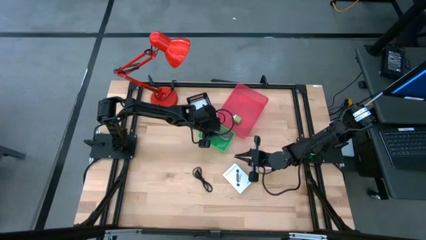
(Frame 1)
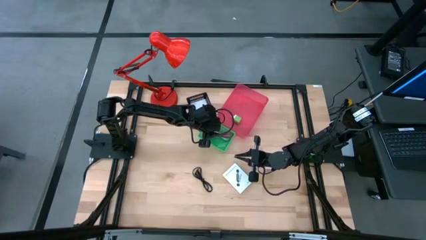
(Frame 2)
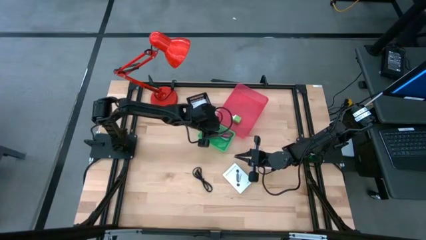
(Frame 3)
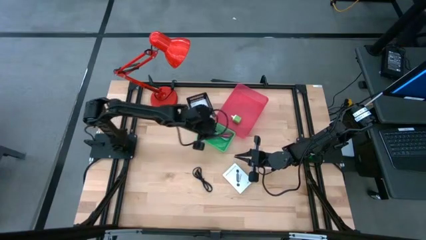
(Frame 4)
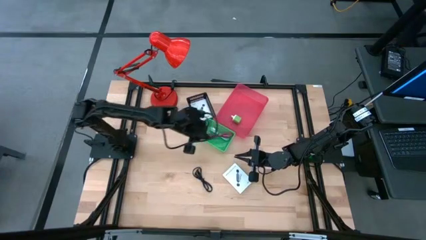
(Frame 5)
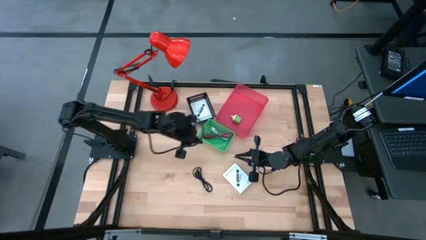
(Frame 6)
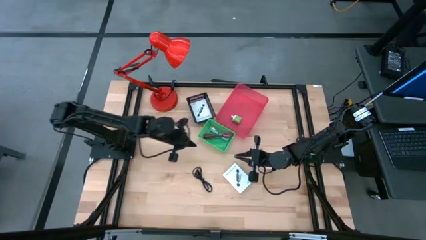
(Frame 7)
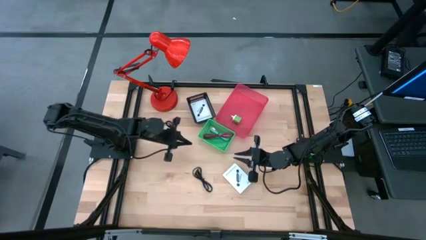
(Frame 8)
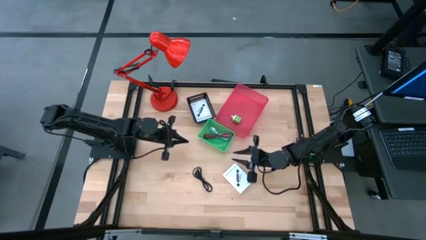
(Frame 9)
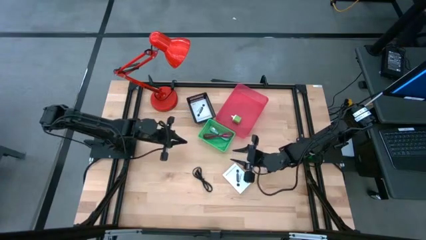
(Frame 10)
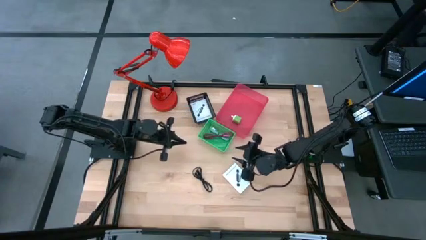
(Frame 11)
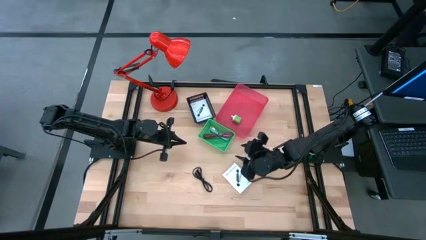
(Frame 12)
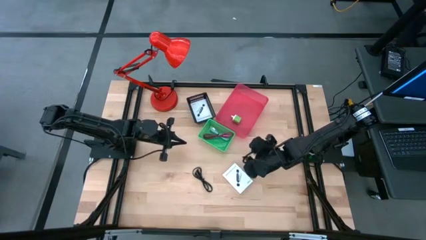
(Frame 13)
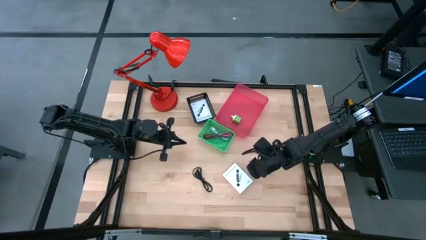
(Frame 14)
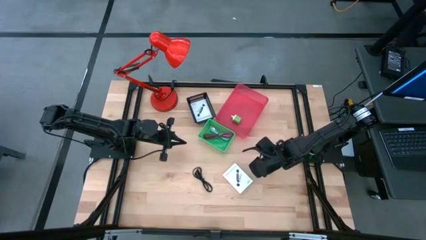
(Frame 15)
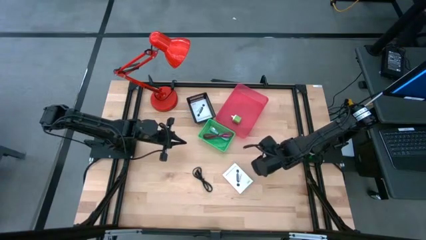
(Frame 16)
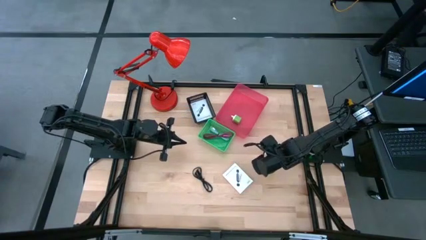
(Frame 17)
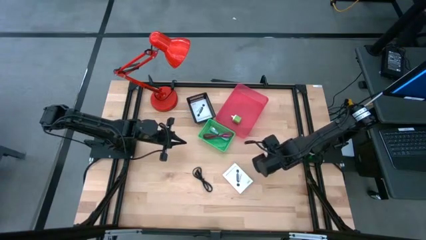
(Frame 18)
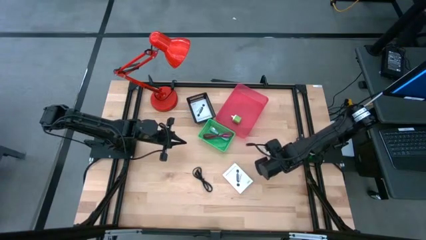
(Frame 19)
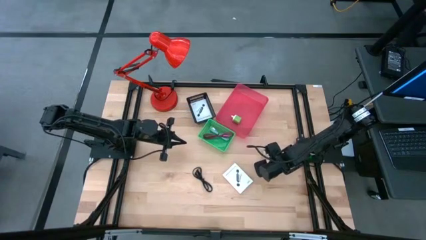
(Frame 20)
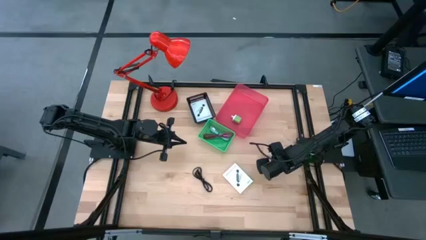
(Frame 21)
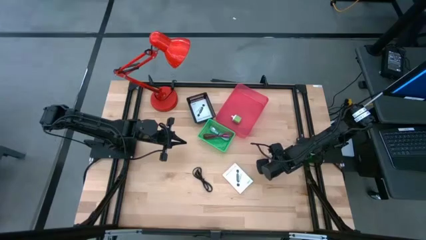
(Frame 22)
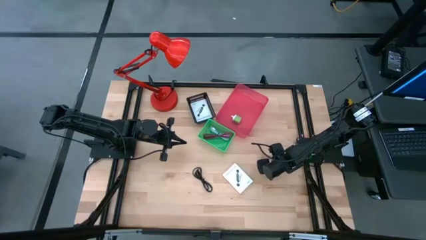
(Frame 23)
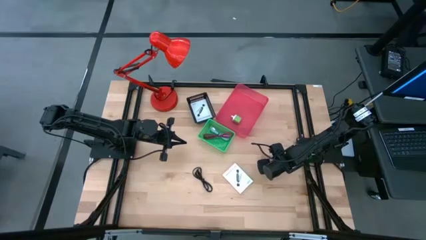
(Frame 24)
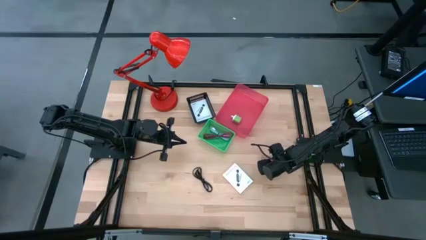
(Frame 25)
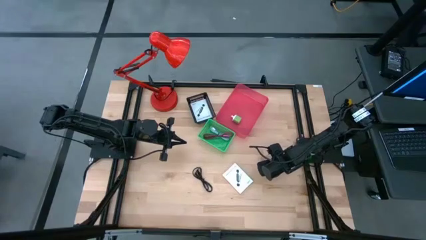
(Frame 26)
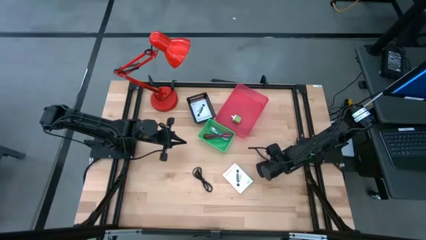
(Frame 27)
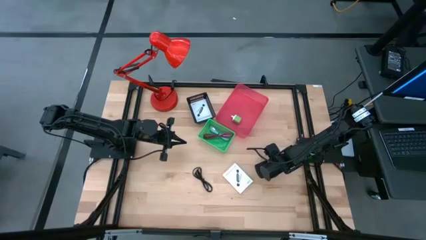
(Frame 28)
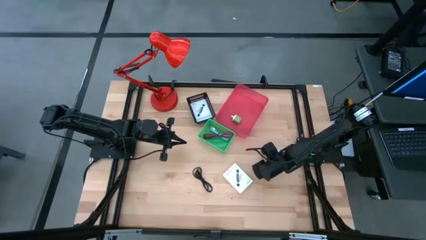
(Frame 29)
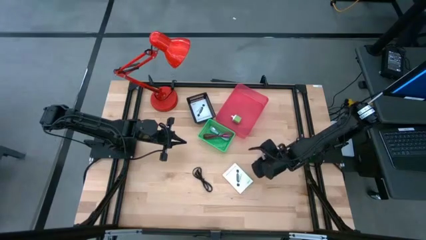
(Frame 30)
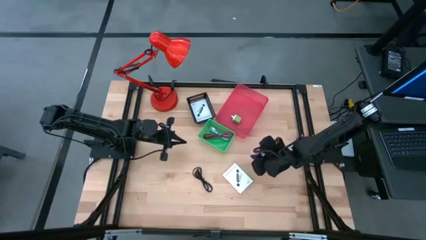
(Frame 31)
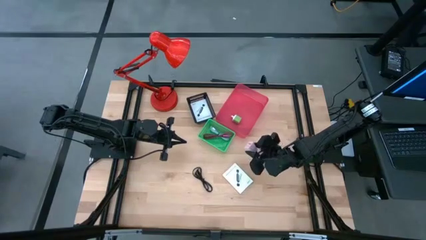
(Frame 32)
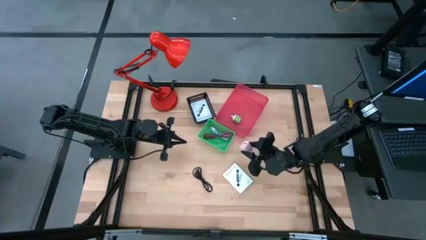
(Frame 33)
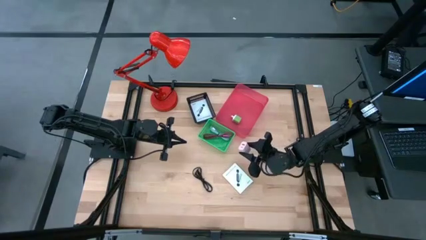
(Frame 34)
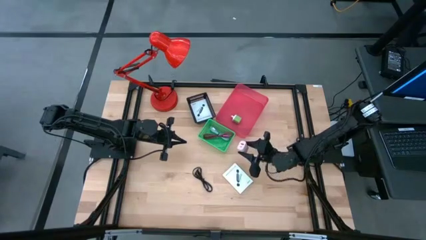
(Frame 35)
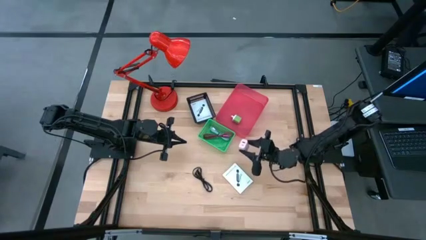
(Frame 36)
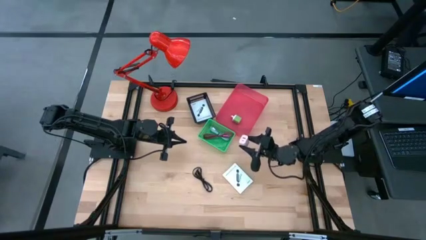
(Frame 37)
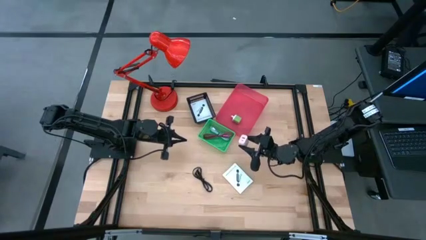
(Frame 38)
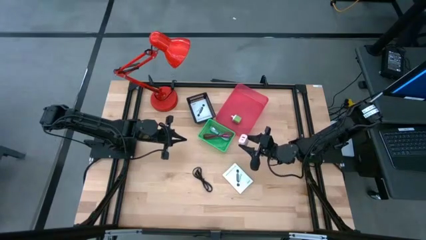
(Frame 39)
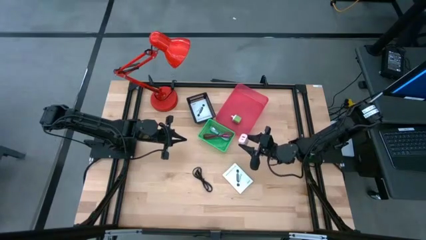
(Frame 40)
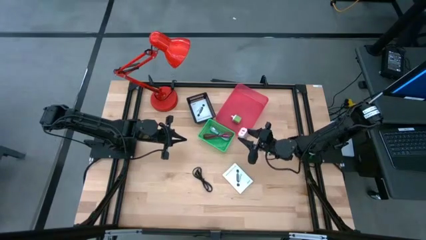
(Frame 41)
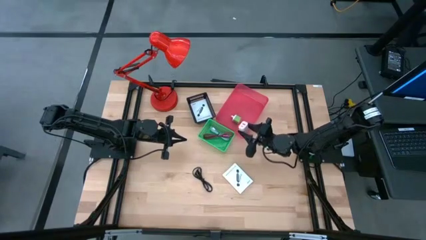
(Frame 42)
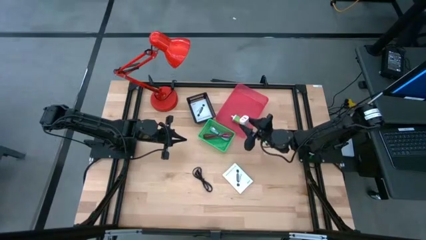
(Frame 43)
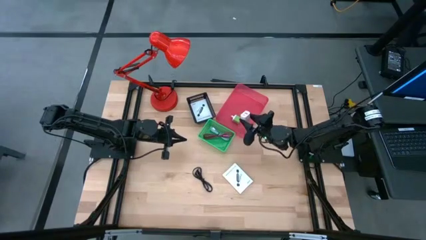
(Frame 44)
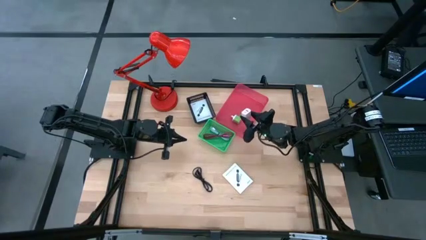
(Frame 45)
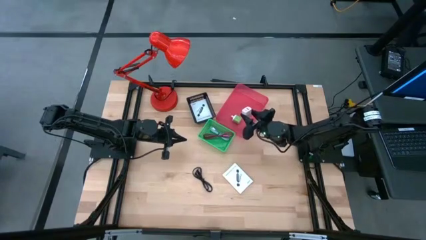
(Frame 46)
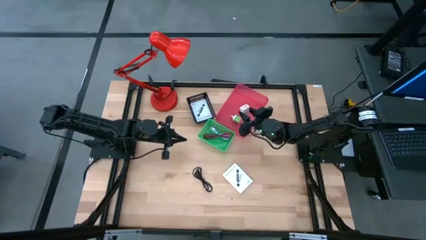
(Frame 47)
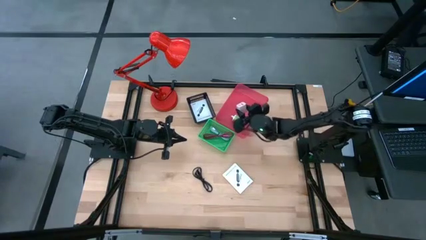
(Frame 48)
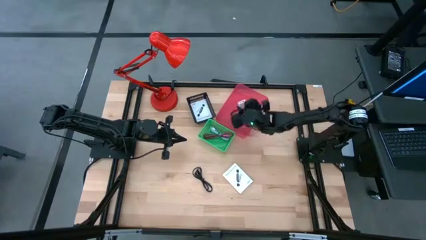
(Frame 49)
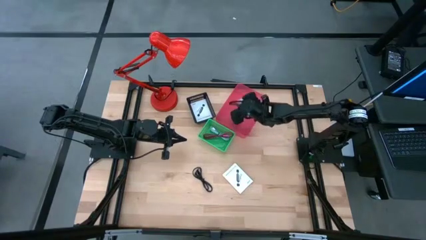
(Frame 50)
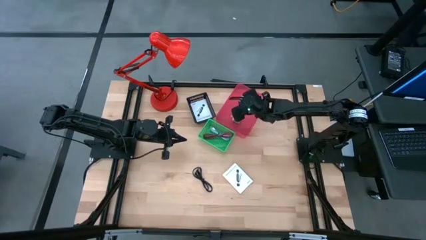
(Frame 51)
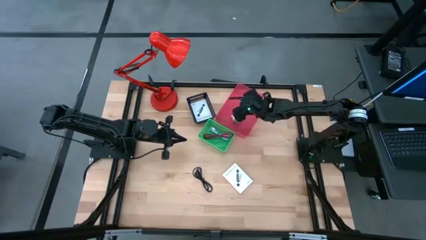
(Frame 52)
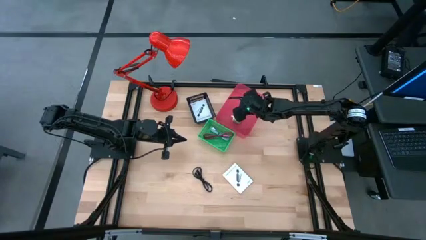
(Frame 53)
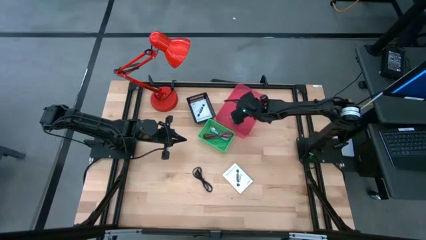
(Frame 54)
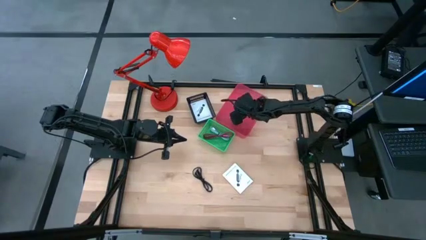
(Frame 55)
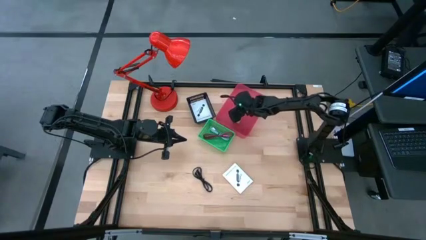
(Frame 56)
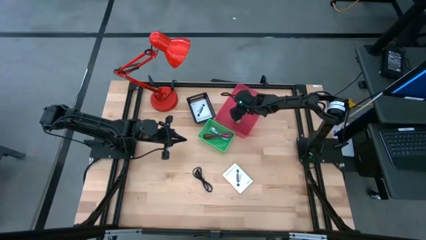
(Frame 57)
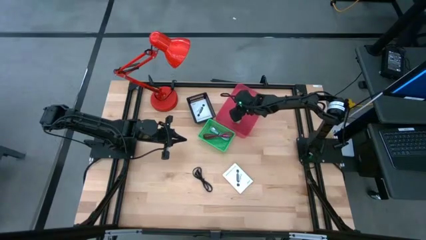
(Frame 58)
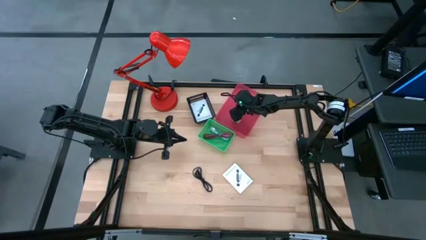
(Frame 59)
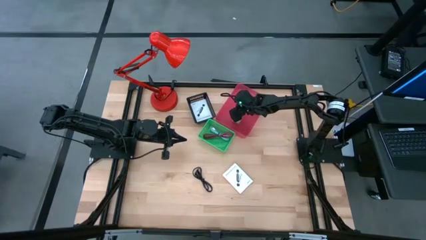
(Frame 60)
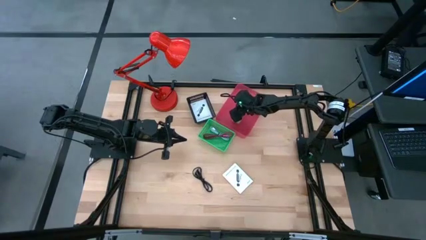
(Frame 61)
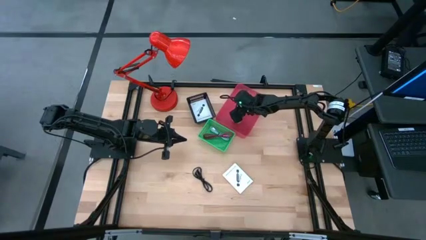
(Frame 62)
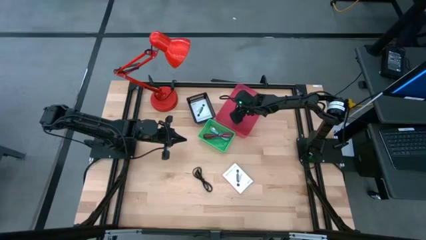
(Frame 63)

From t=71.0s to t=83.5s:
Task: Pick and place items into bin
Put the white charger adapter into the red bin

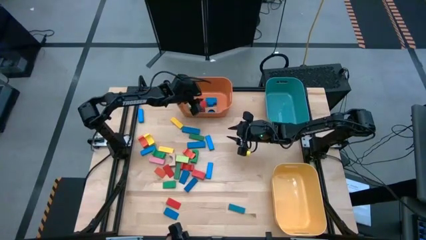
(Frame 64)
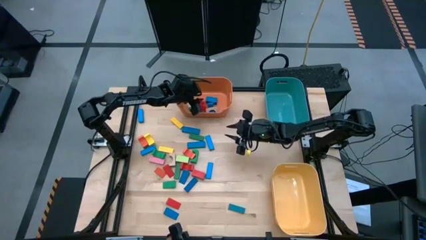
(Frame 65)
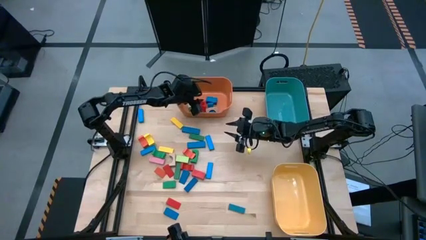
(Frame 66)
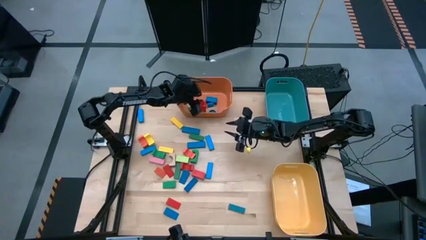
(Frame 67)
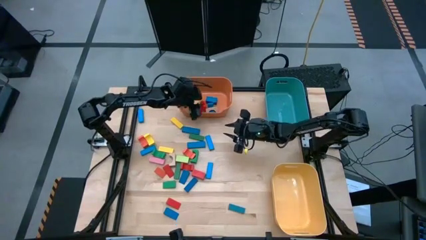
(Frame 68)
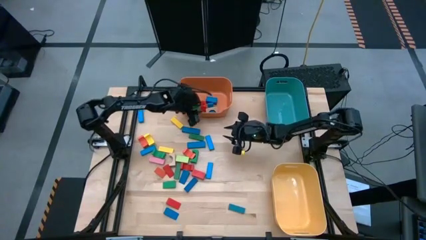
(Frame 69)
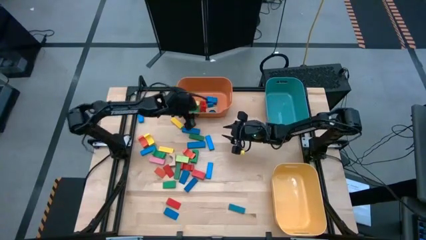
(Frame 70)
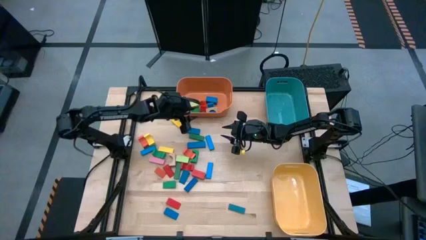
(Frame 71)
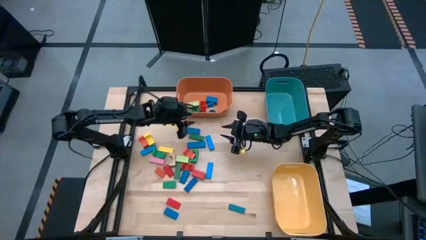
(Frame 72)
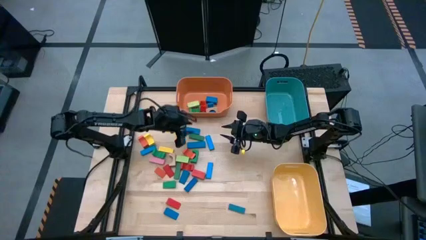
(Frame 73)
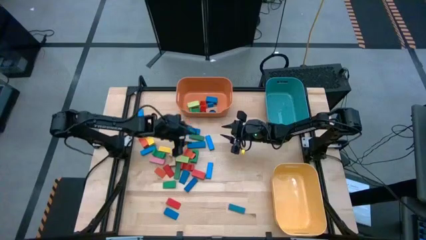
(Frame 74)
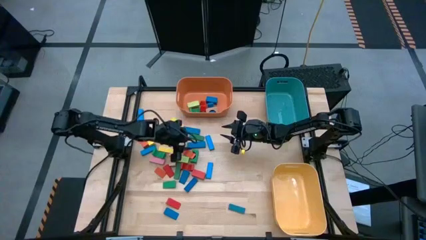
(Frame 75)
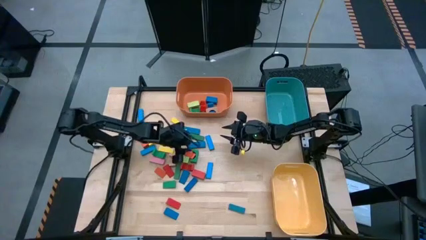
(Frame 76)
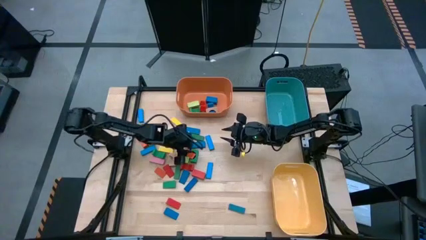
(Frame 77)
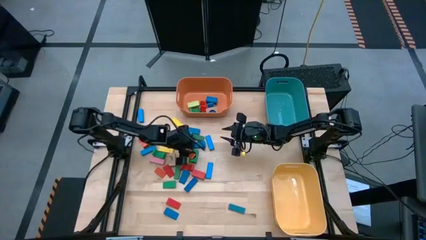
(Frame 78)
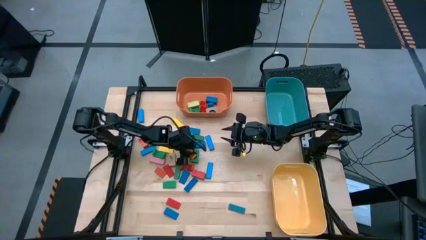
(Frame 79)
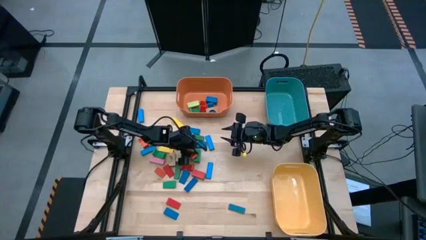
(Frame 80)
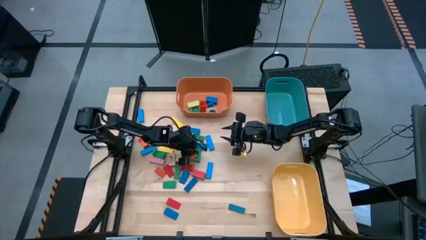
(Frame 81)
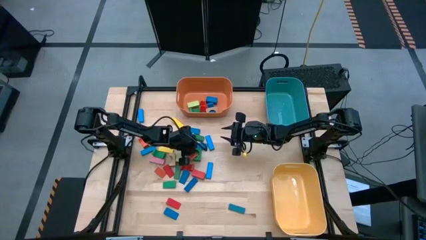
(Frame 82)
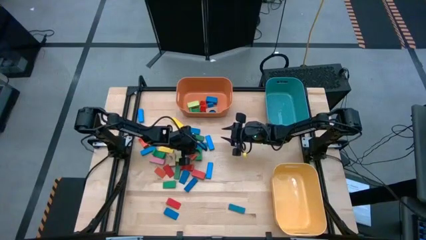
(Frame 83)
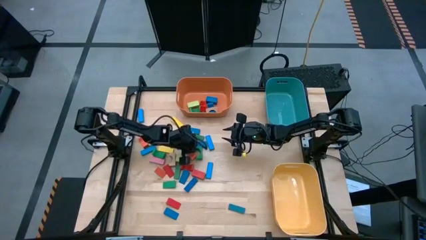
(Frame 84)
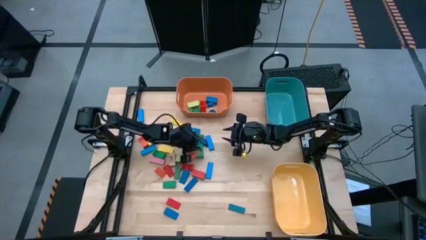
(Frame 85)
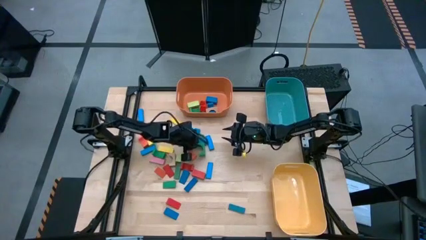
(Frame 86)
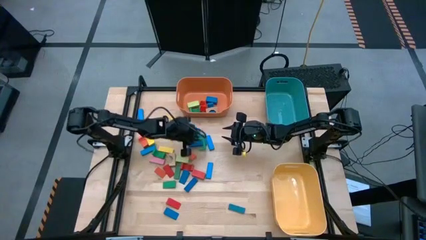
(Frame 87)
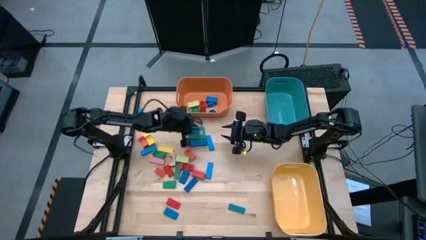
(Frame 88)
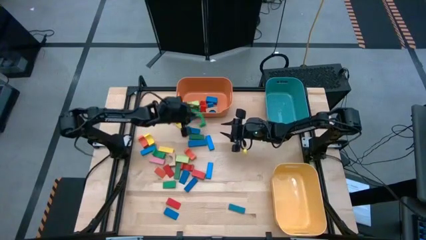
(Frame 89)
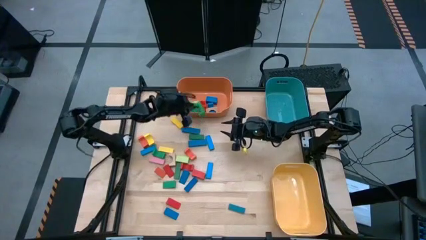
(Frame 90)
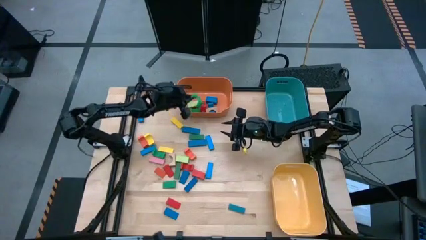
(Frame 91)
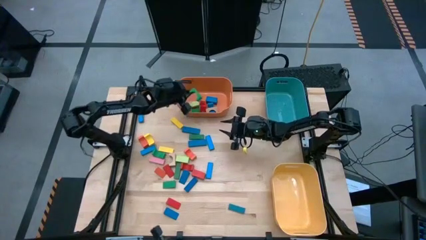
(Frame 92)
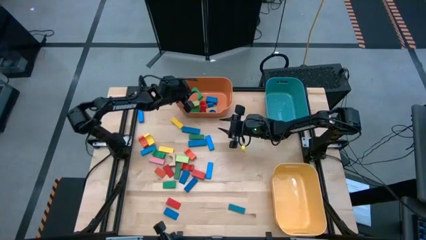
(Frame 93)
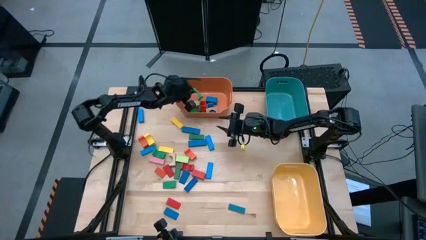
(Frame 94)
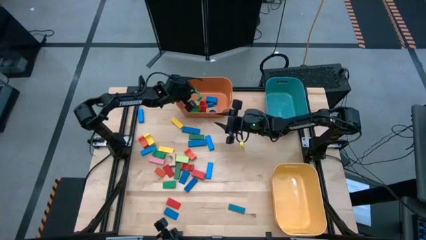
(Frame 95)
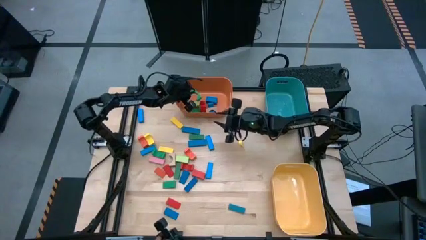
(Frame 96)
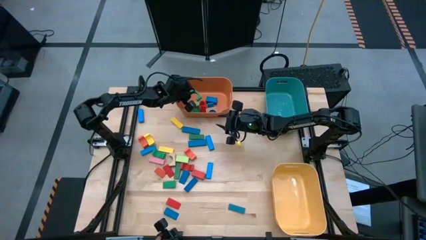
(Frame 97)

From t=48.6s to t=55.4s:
Task: Sort blocks by size
Put the green arch block into the orange bin
